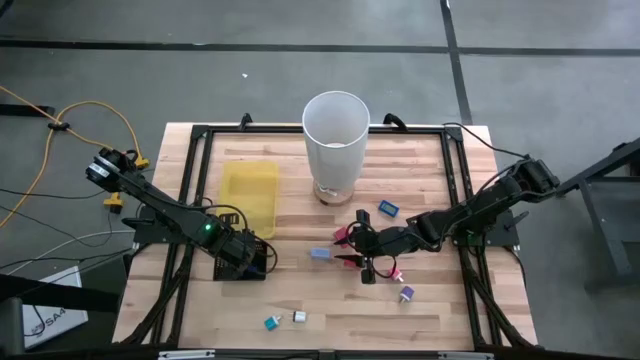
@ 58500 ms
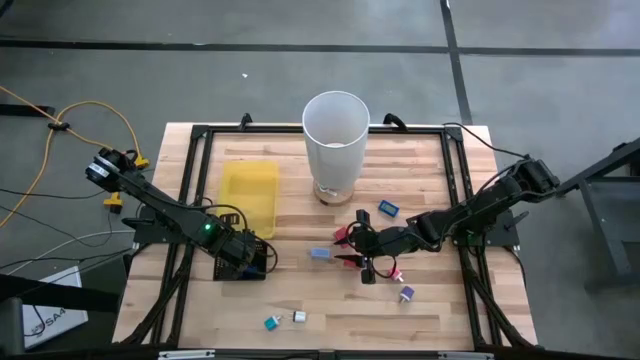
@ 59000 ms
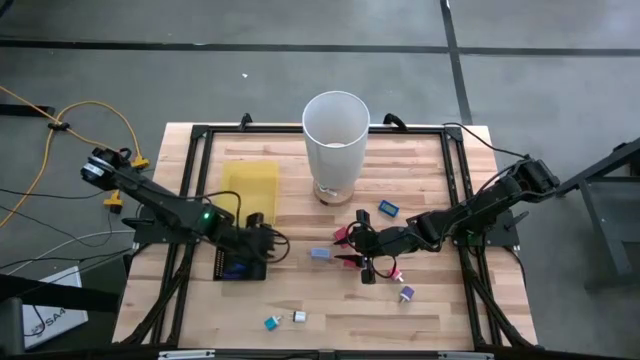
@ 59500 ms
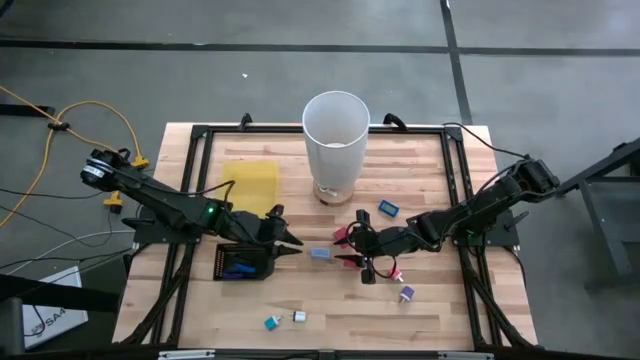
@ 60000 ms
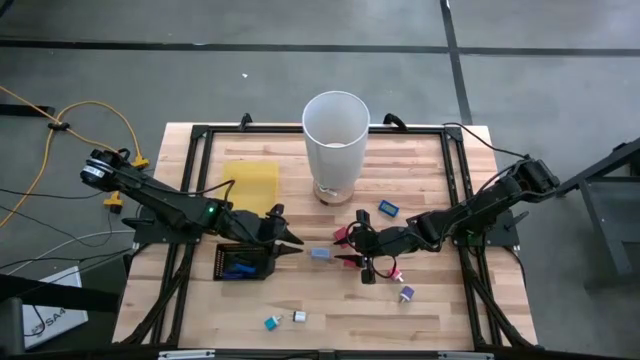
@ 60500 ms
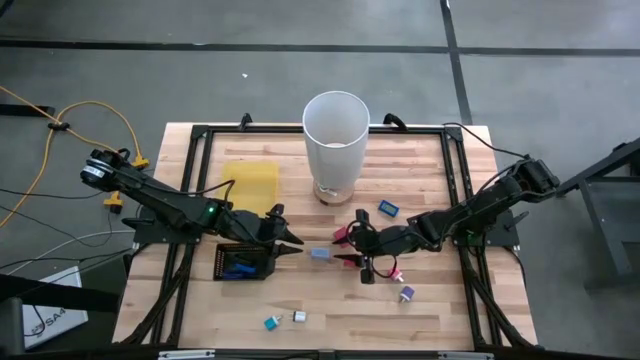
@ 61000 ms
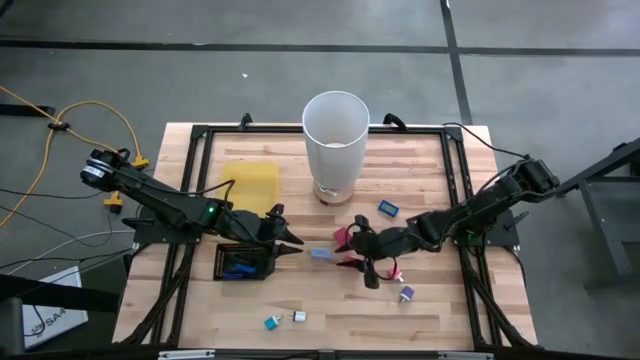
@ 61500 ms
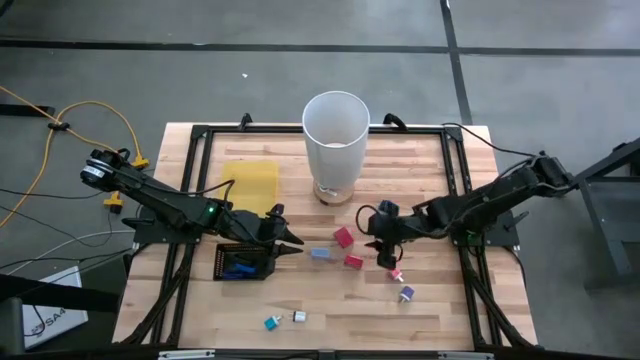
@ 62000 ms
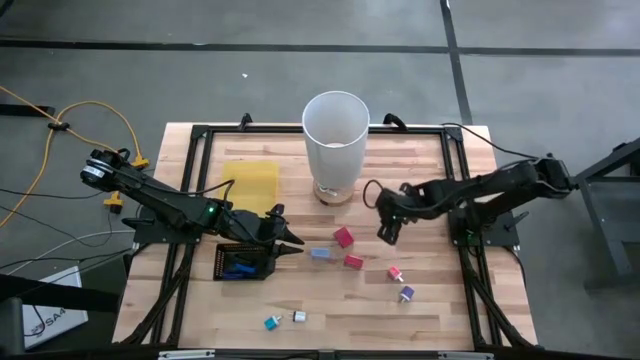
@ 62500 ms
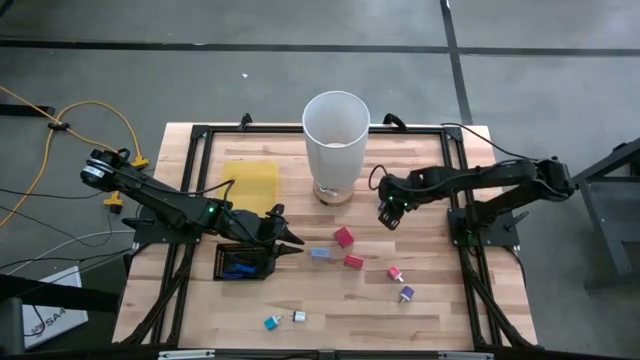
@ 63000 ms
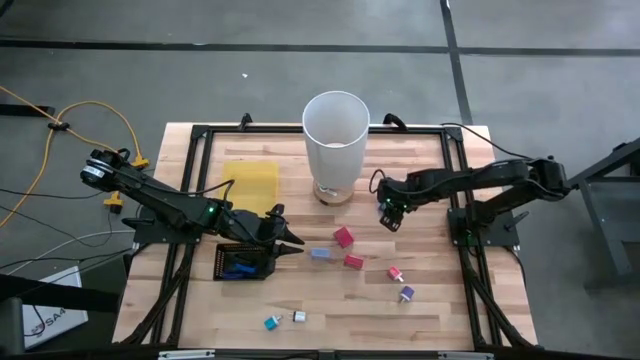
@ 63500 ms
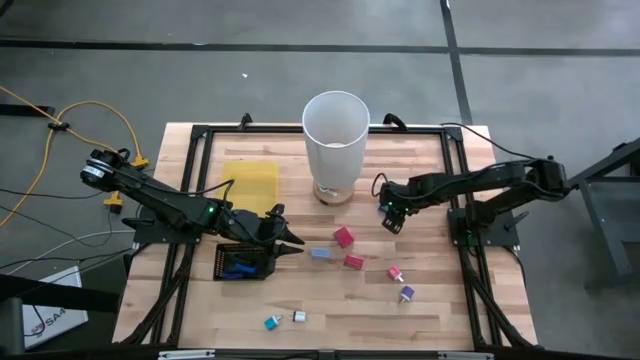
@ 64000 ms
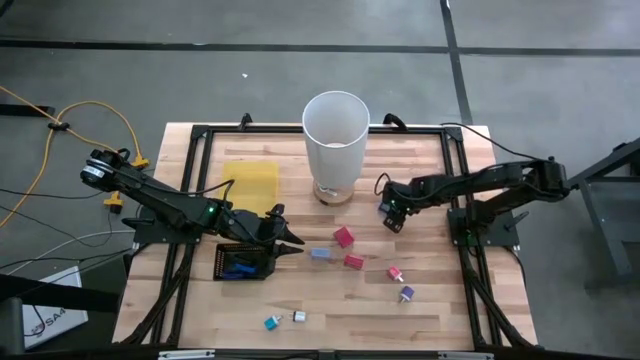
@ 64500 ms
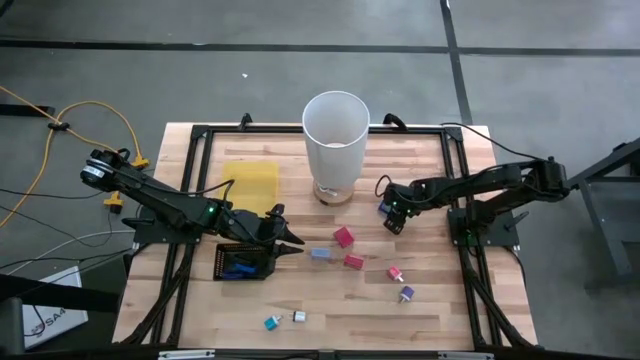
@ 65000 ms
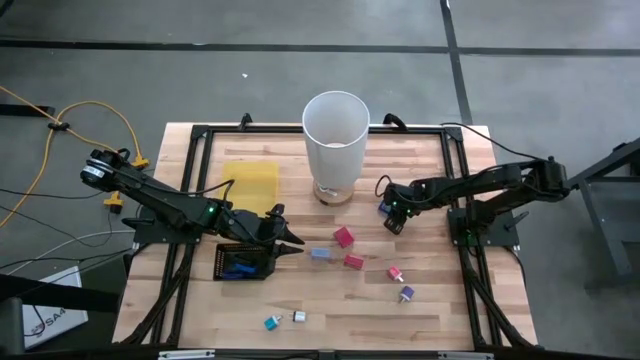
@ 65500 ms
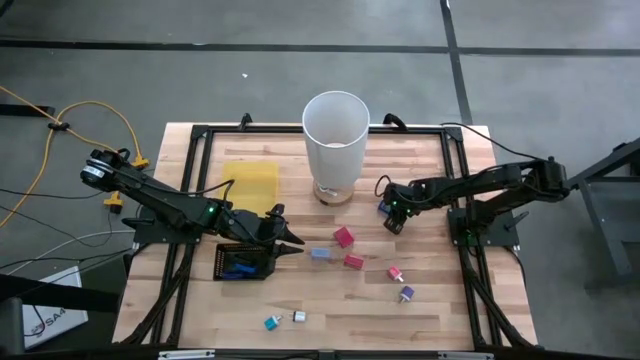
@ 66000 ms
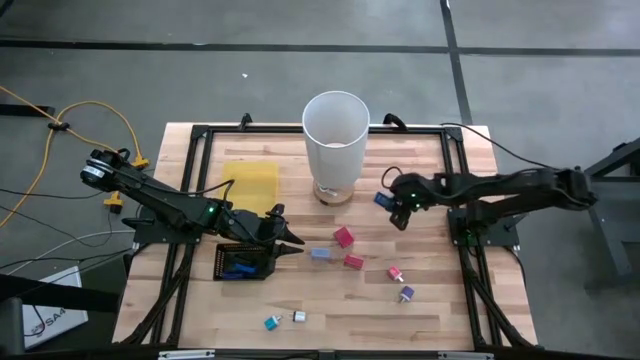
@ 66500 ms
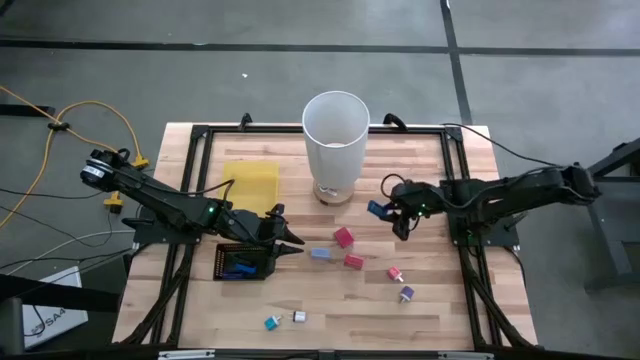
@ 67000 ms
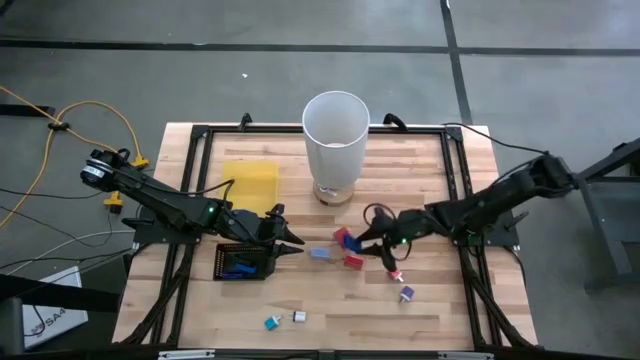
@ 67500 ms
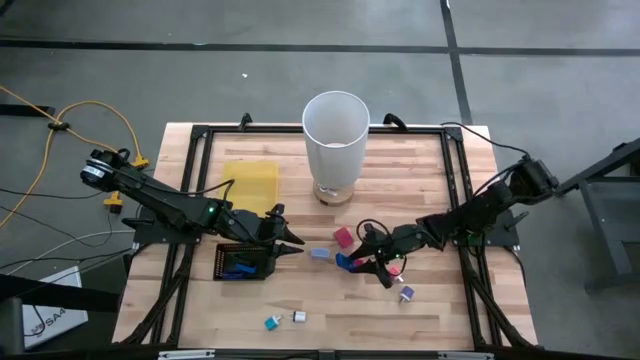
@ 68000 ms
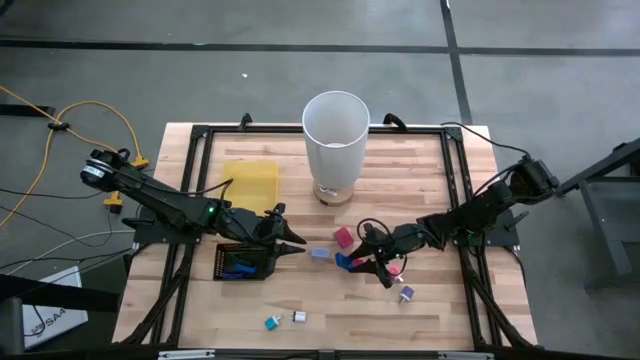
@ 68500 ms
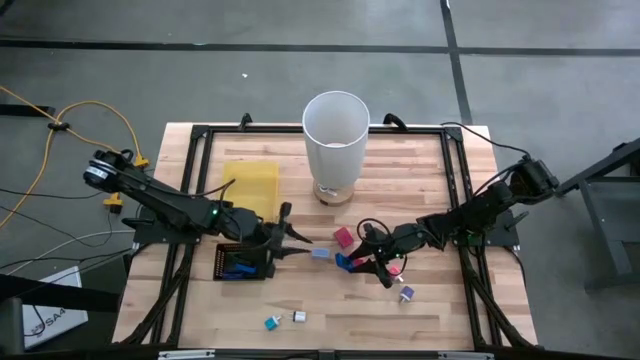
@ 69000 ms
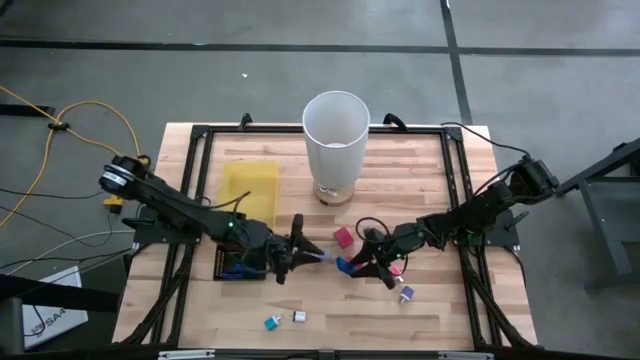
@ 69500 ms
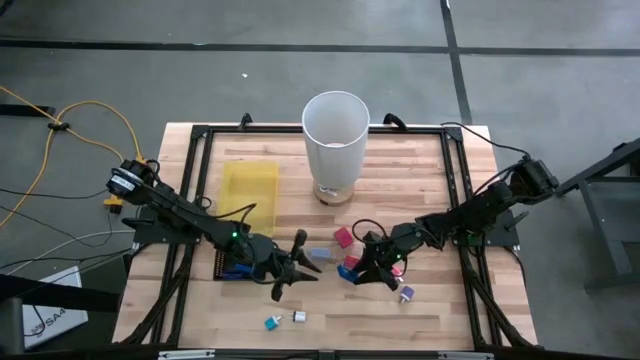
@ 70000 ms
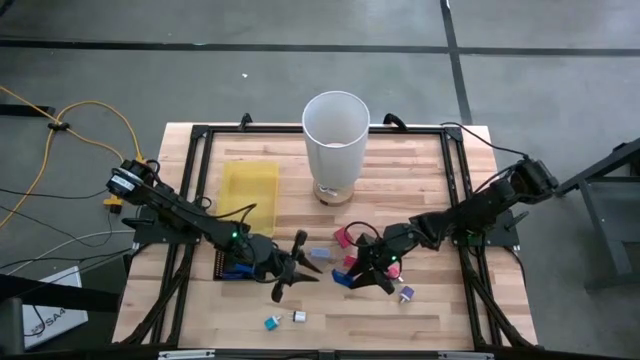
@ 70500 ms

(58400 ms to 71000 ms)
Task: Pick & Place Office items
Put the blue digital clock into the black bin

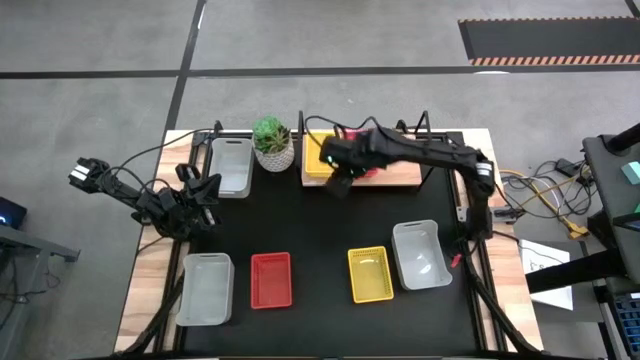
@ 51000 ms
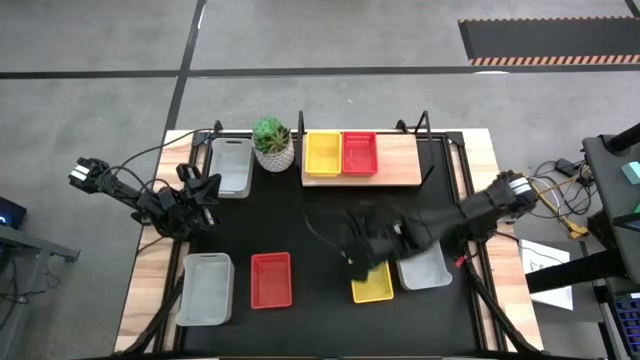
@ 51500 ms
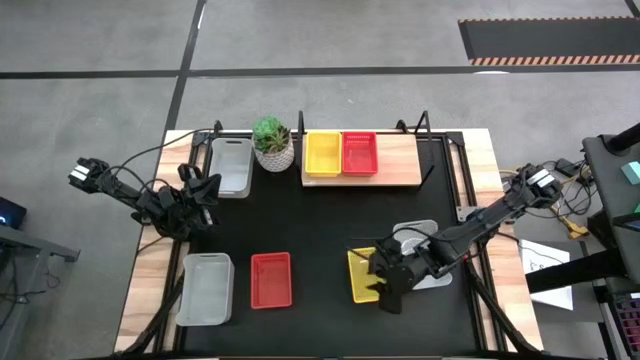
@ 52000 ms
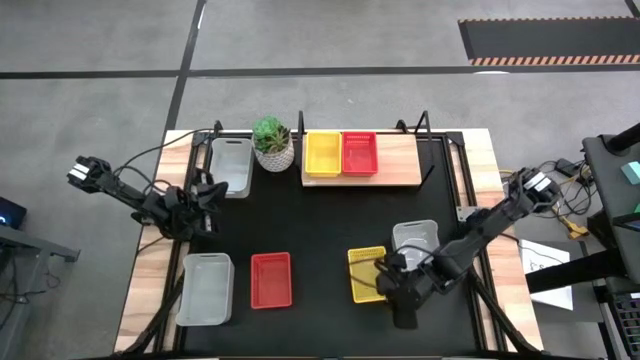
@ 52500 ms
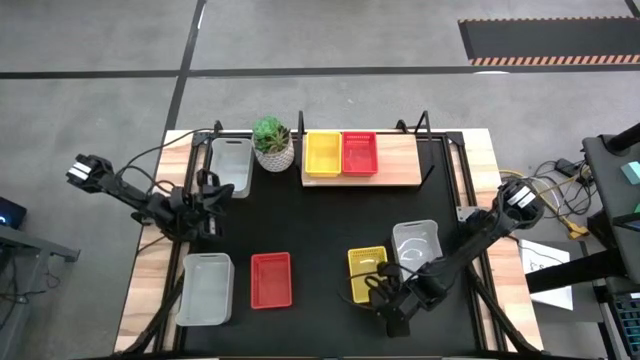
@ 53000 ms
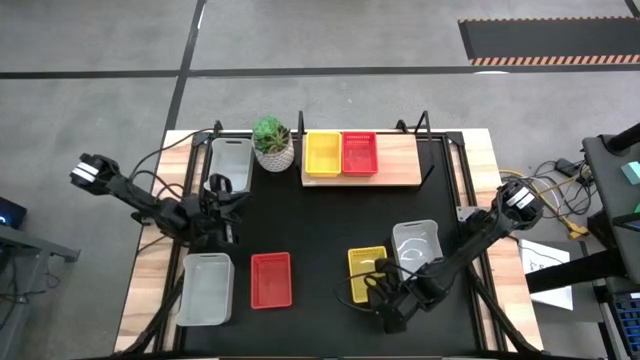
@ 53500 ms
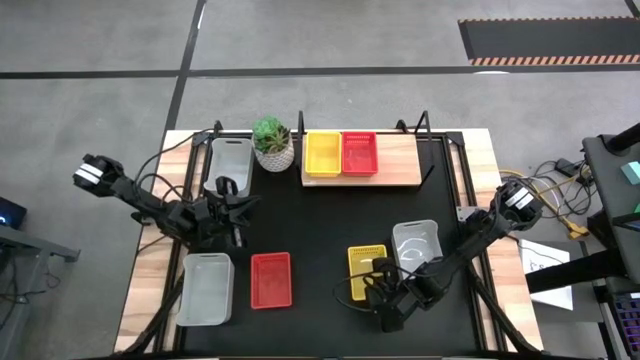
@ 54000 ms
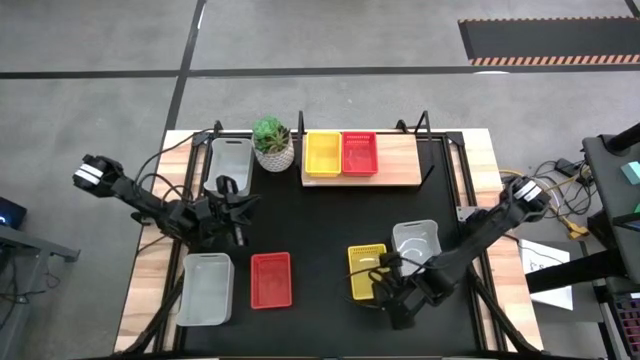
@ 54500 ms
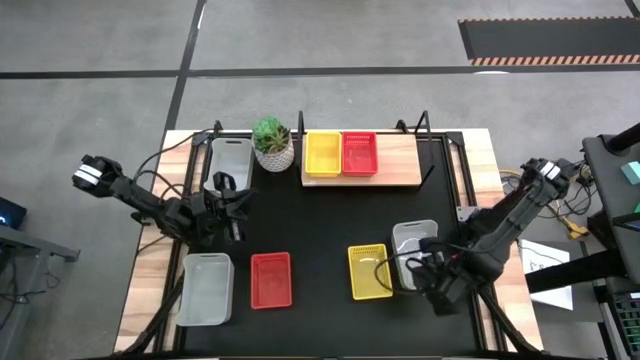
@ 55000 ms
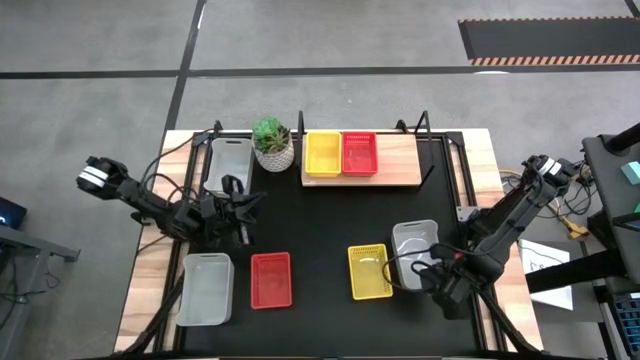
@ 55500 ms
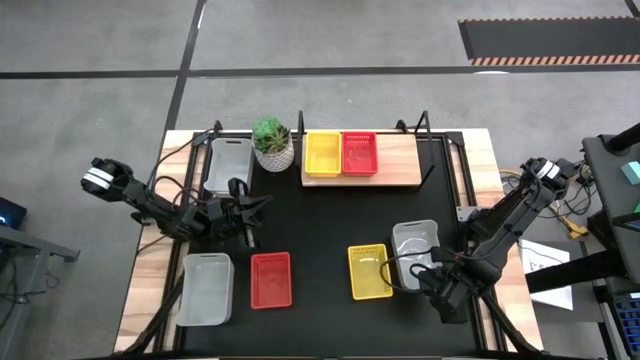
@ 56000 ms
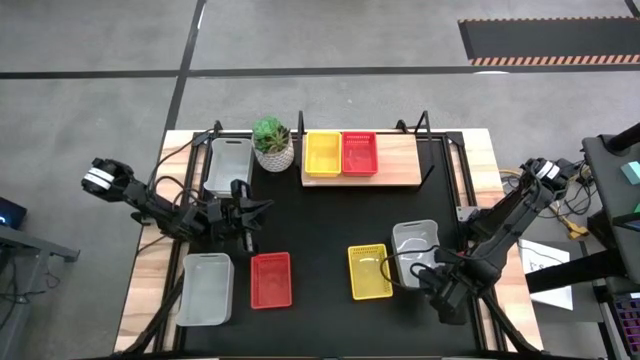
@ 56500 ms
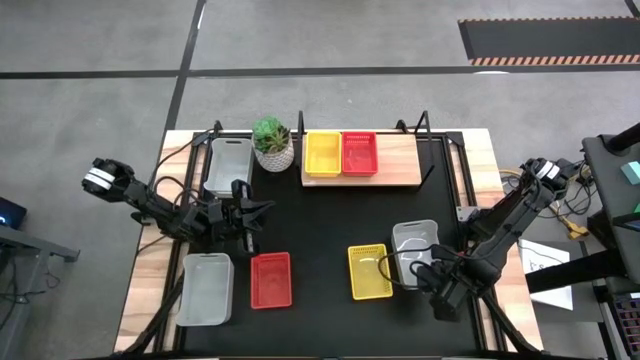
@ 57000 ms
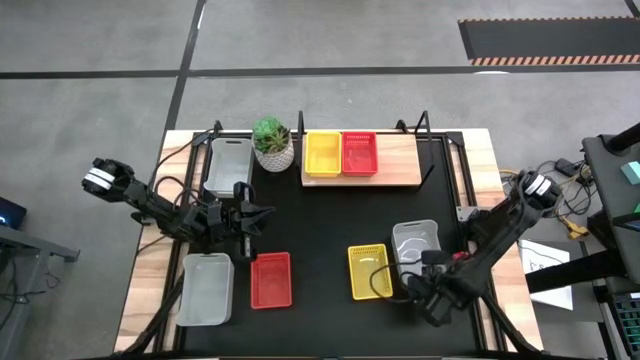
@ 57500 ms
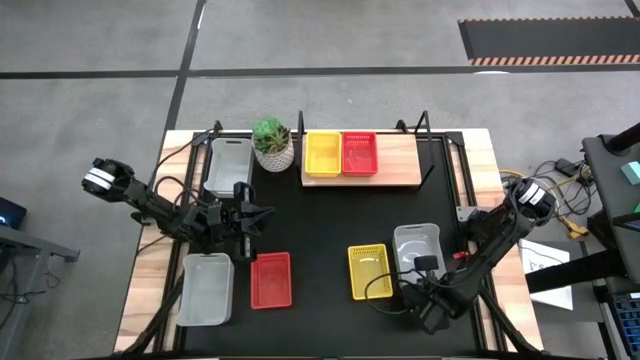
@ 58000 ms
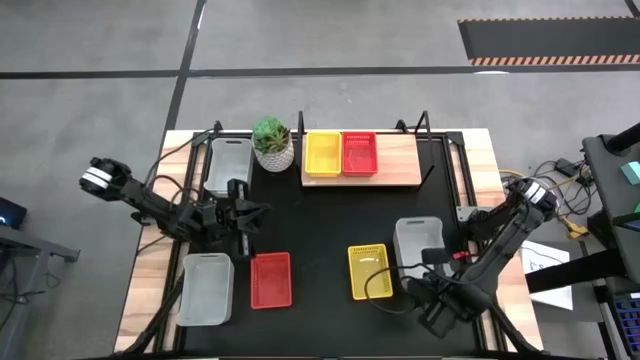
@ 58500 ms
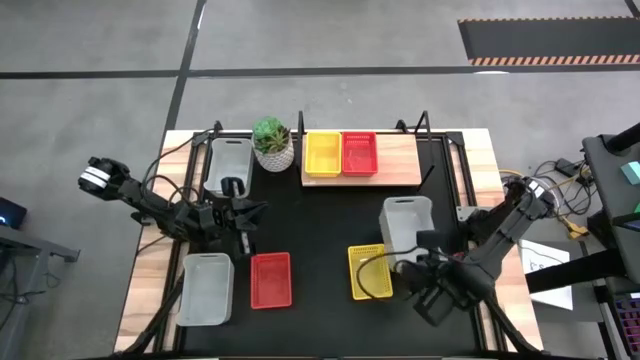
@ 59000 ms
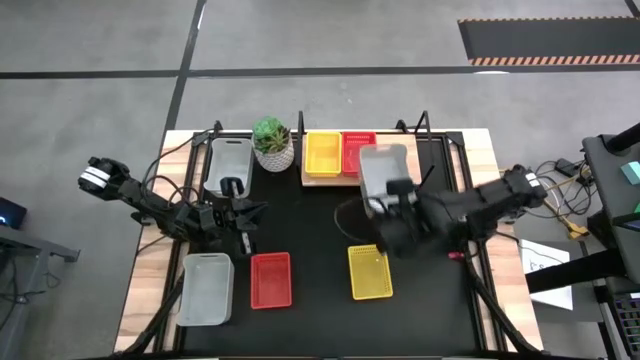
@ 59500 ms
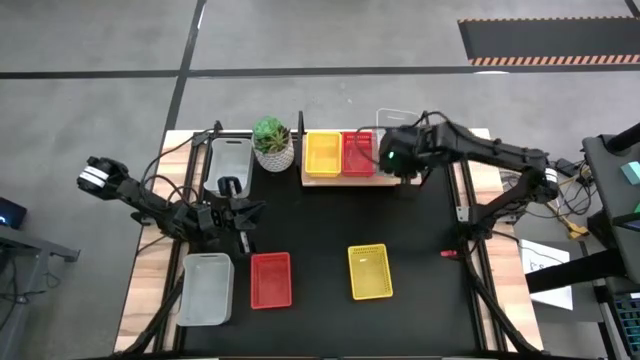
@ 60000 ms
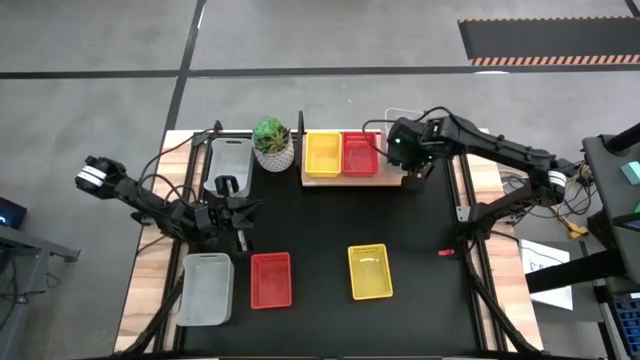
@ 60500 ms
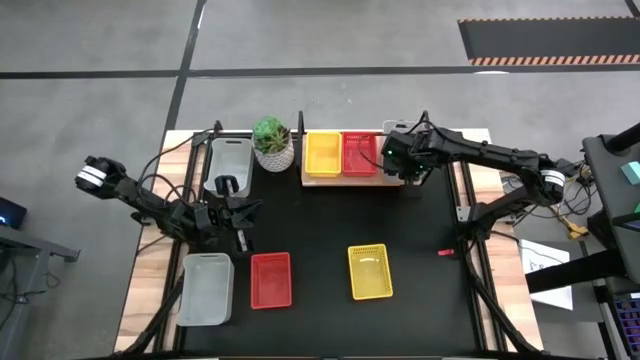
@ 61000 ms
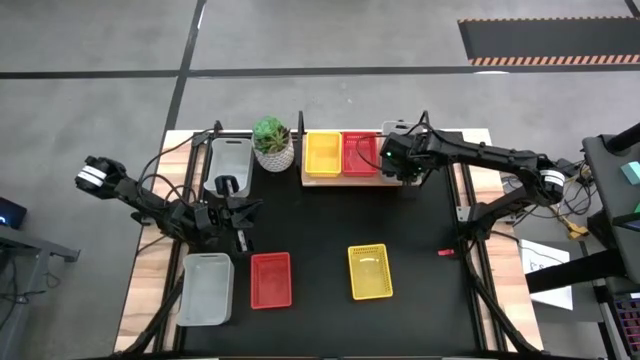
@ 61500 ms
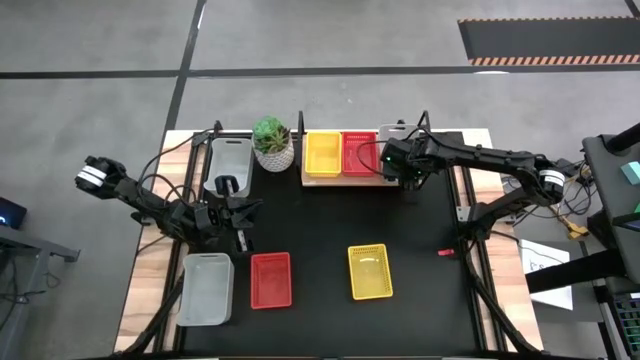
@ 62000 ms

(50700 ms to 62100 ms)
Task: Stack baskets on shelf by color
Put the bottom right gray bin on the shelf
